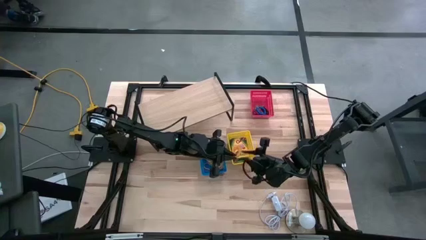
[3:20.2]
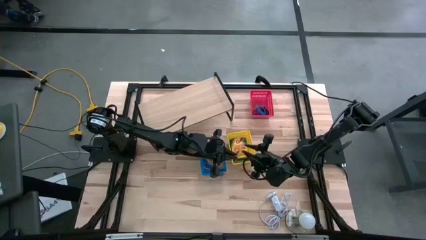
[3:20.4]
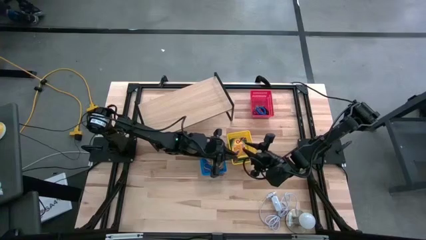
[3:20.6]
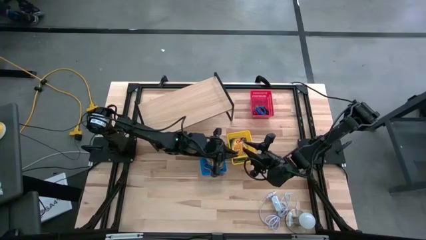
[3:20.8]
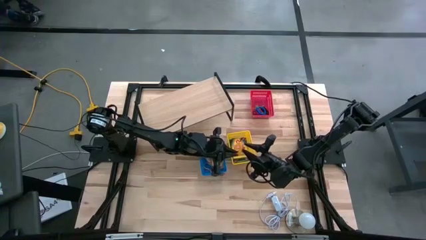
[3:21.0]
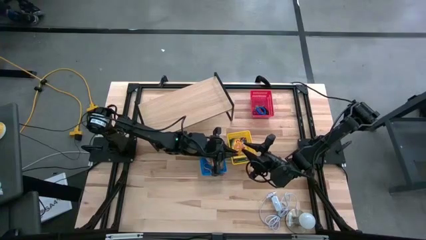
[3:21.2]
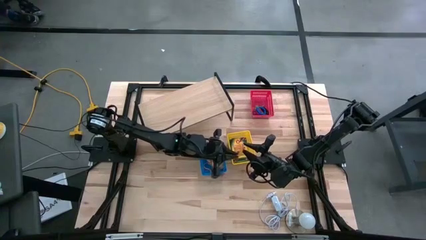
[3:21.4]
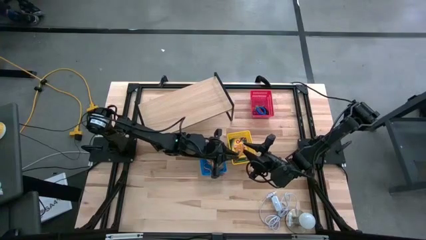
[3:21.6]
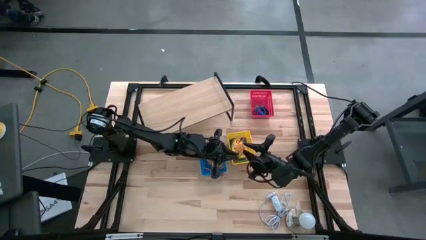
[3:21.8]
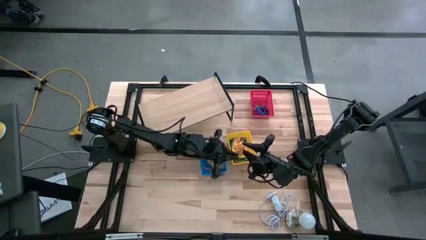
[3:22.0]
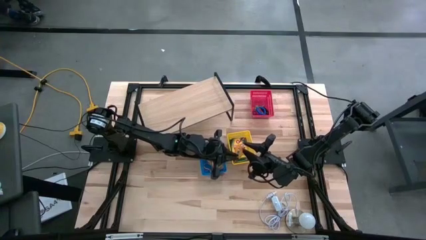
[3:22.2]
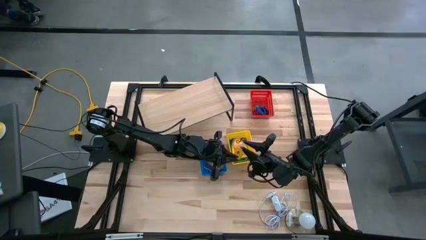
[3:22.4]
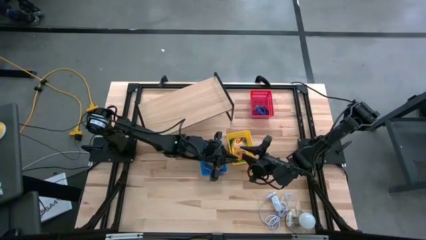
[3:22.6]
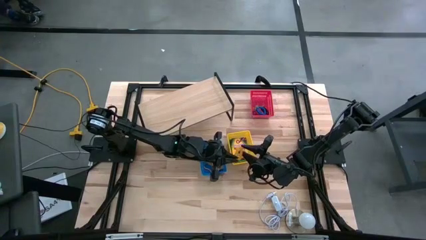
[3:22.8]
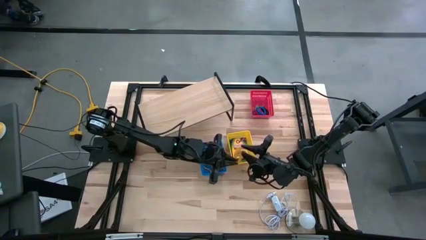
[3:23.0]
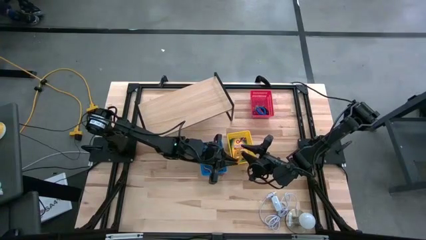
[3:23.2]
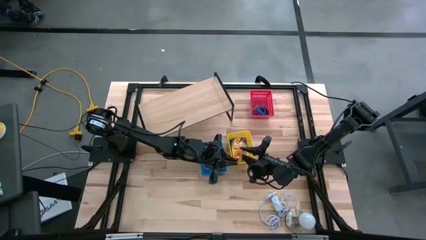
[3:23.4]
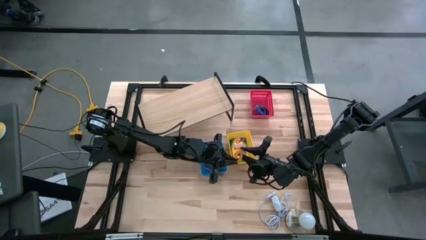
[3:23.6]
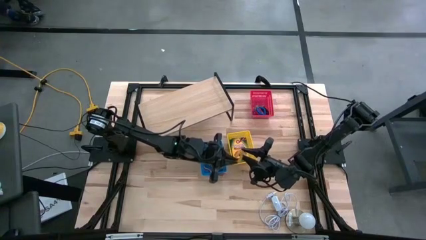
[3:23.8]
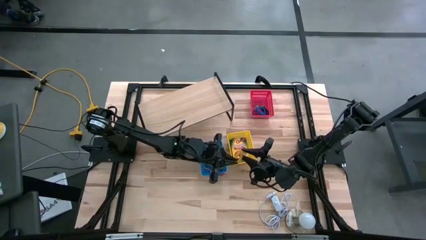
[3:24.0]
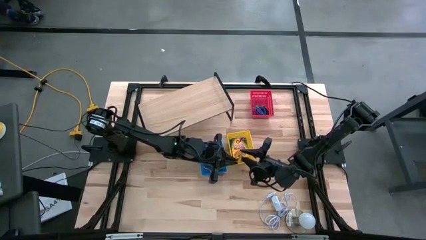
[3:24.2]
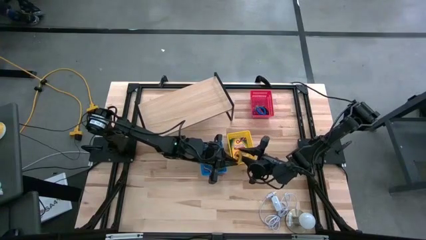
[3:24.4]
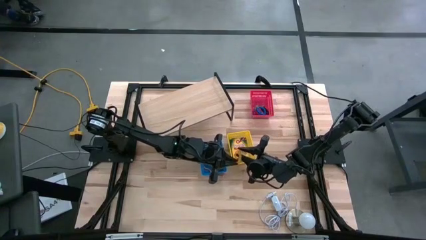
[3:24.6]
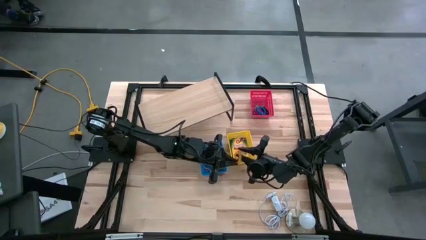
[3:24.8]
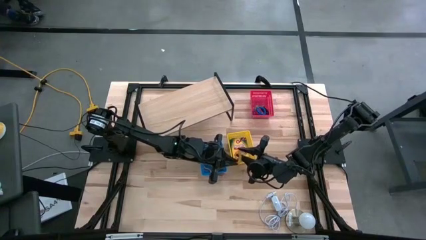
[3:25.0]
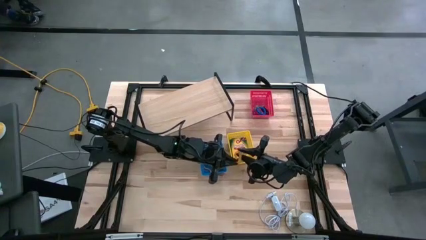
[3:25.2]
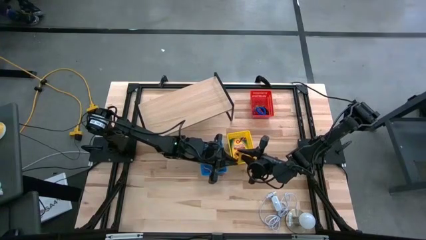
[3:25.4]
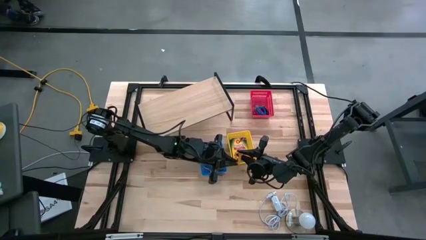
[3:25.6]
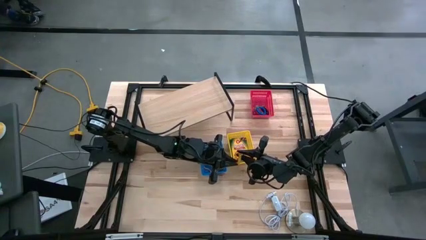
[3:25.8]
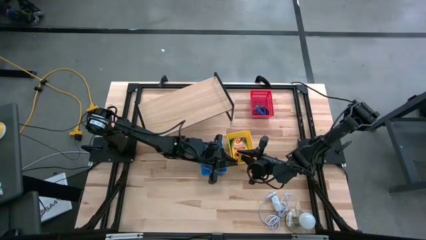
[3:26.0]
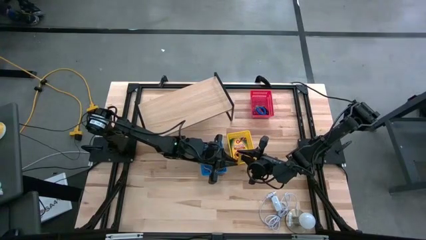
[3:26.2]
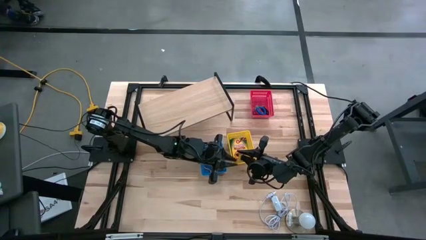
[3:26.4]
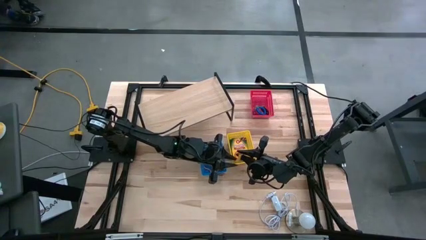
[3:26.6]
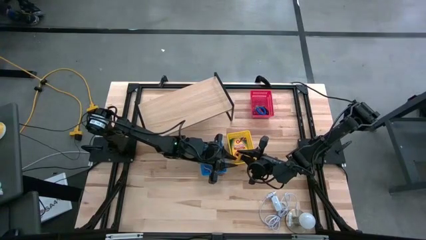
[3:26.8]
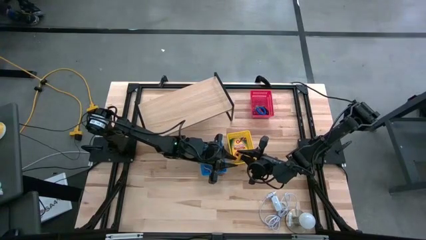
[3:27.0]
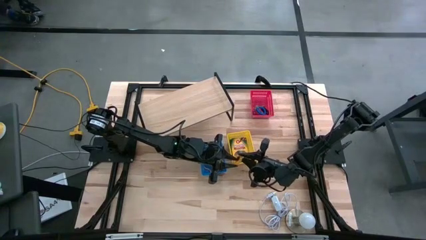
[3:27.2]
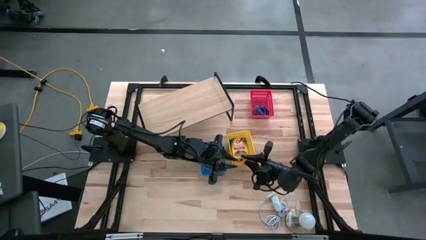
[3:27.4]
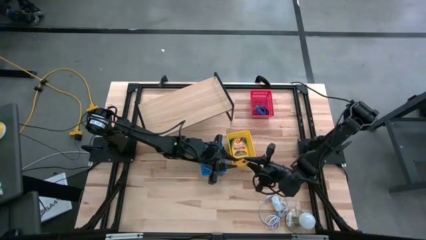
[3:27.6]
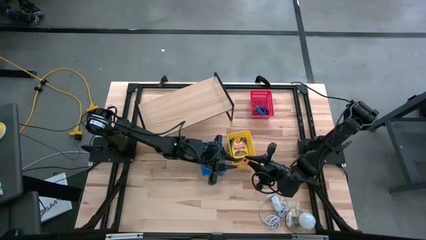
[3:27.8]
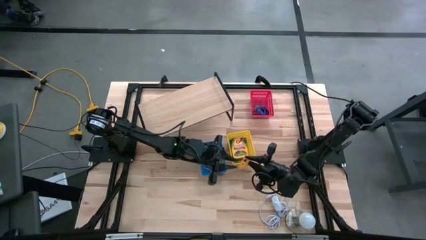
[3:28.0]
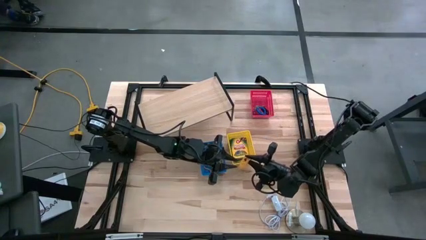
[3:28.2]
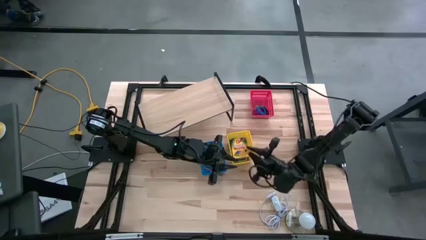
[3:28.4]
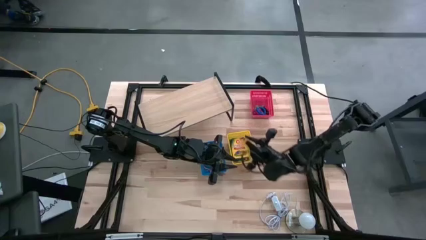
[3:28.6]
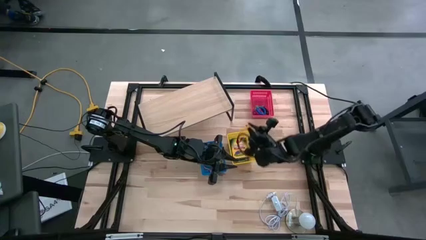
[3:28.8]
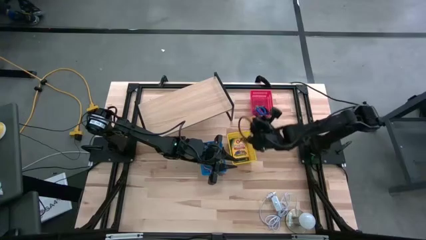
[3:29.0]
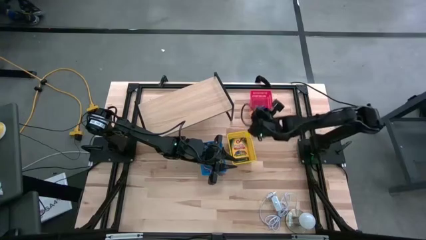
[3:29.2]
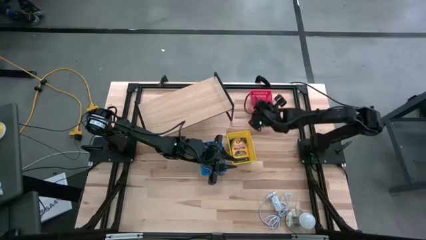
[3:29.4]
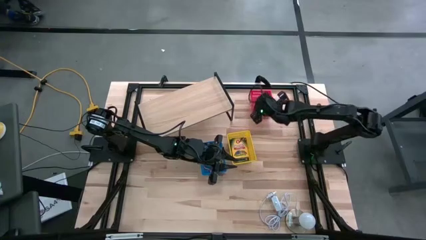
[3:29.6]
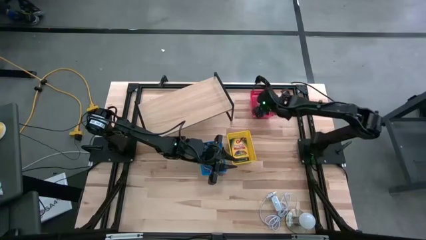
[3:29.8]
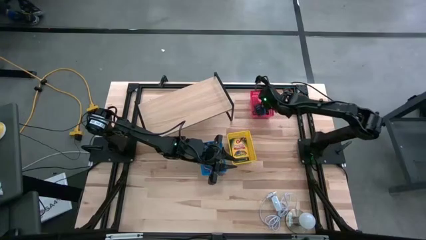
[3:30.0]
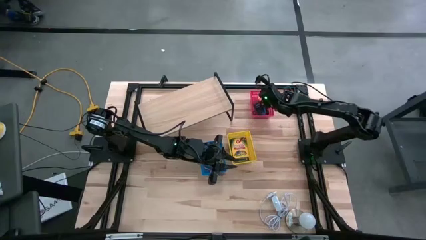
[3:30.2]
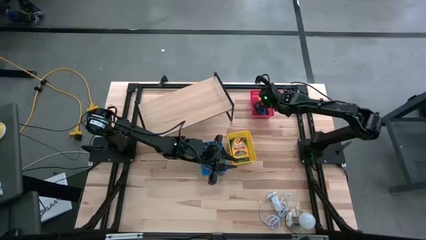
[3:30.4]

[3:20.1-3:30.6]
Task: Pick & Place Office Desk Supplies
Put the yellow spring keychain into the red bin
